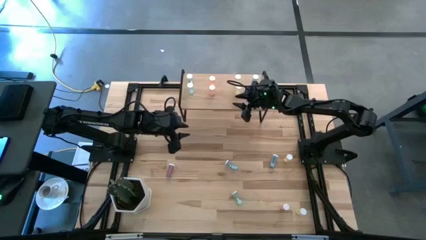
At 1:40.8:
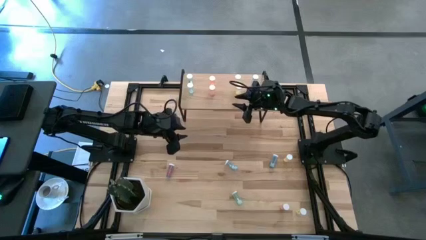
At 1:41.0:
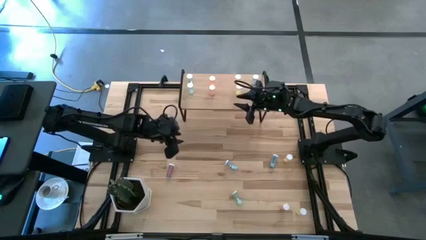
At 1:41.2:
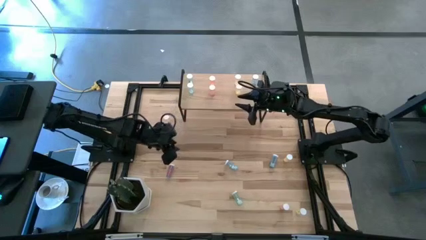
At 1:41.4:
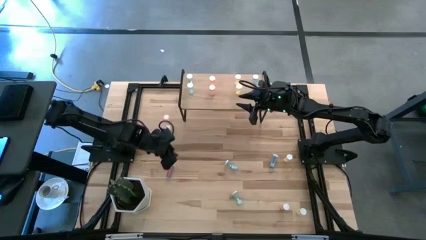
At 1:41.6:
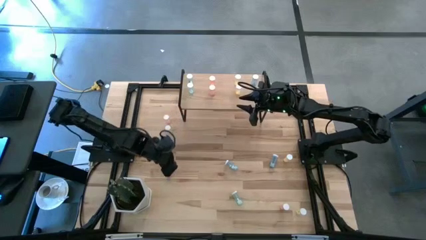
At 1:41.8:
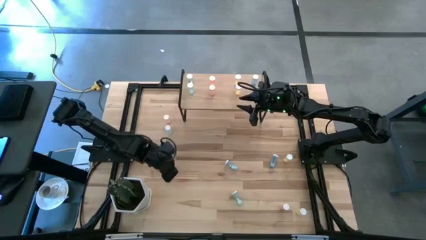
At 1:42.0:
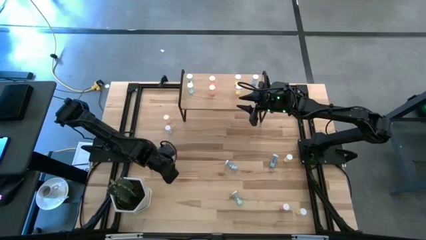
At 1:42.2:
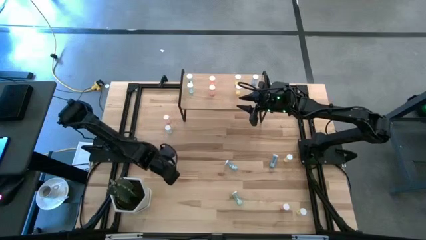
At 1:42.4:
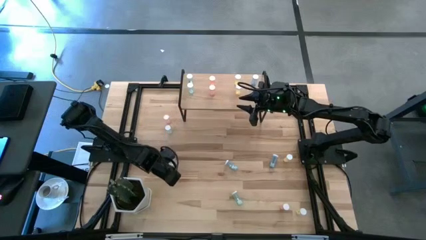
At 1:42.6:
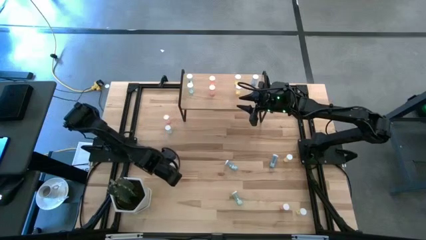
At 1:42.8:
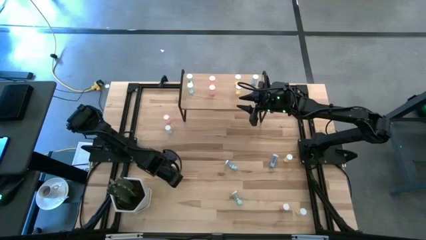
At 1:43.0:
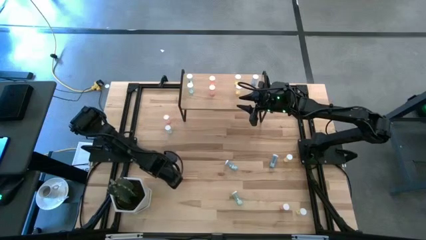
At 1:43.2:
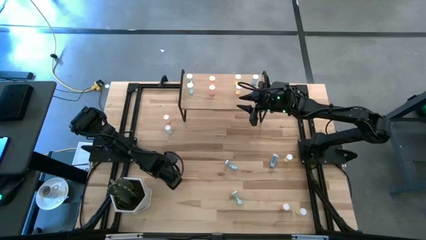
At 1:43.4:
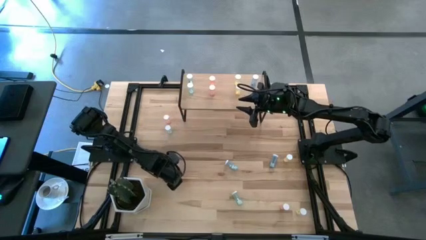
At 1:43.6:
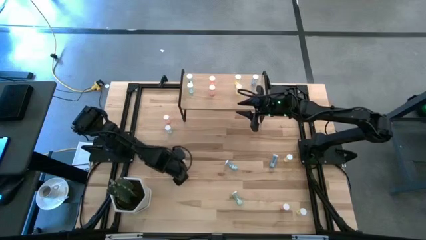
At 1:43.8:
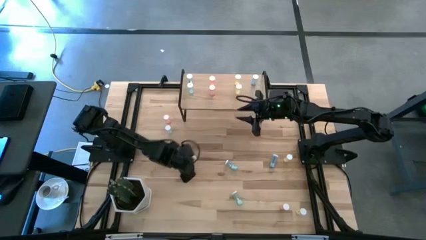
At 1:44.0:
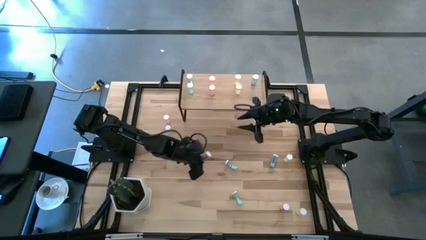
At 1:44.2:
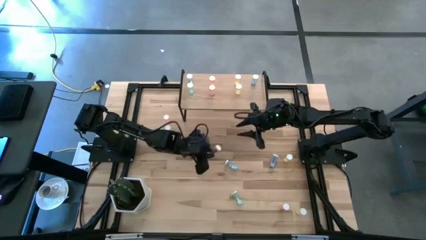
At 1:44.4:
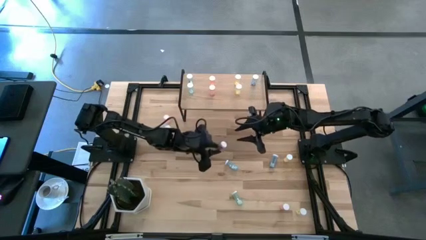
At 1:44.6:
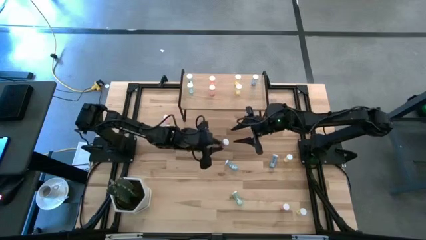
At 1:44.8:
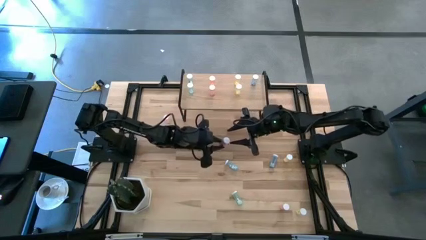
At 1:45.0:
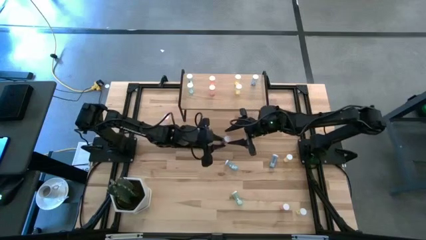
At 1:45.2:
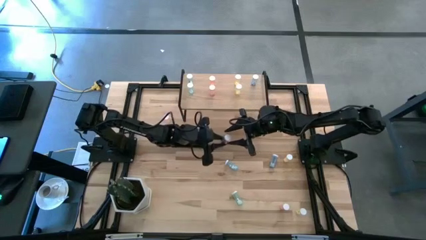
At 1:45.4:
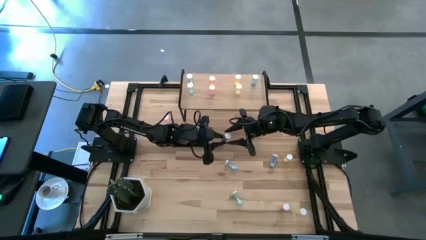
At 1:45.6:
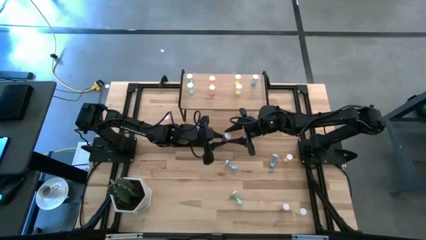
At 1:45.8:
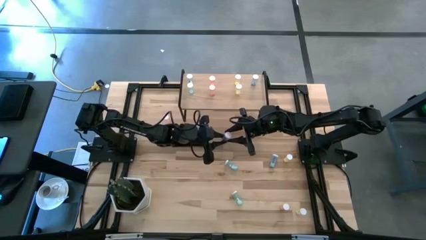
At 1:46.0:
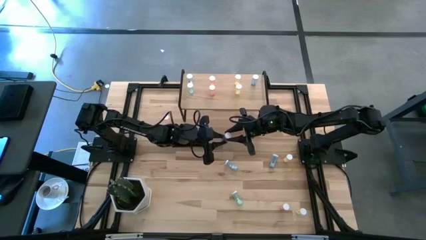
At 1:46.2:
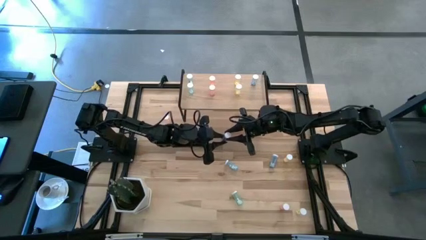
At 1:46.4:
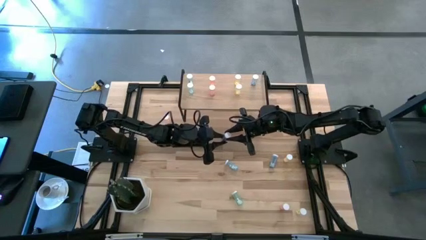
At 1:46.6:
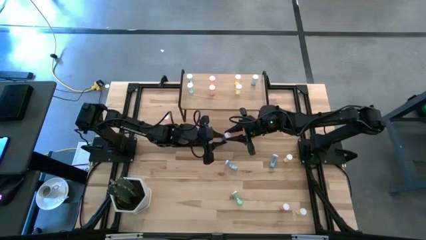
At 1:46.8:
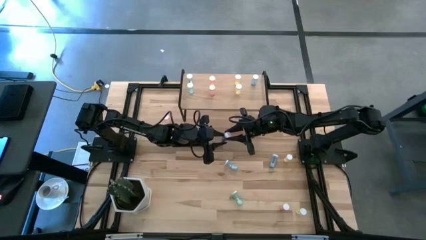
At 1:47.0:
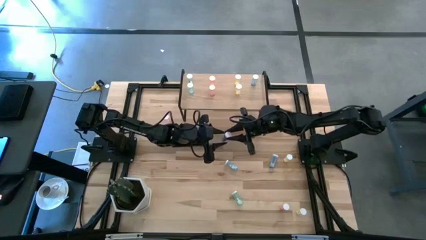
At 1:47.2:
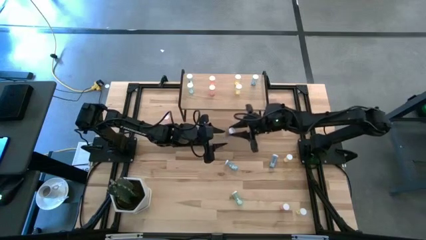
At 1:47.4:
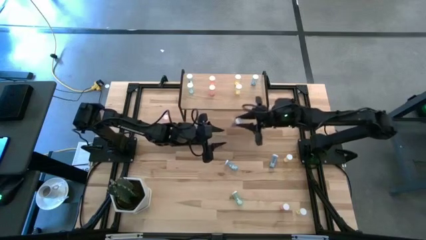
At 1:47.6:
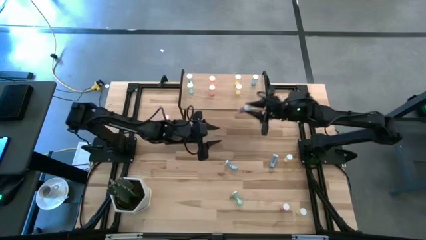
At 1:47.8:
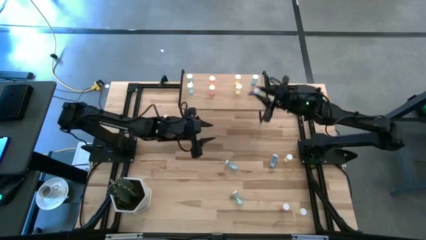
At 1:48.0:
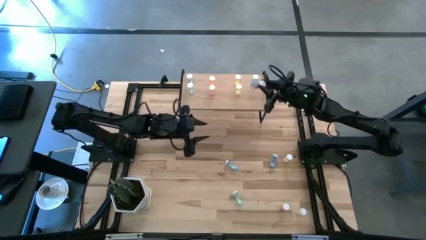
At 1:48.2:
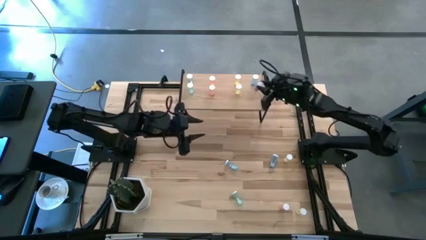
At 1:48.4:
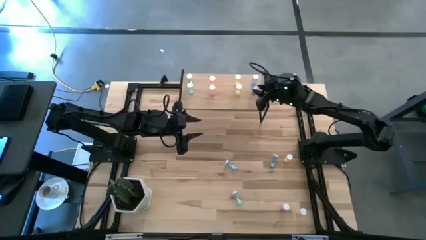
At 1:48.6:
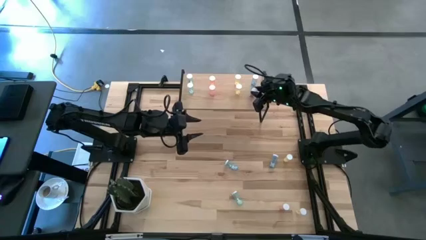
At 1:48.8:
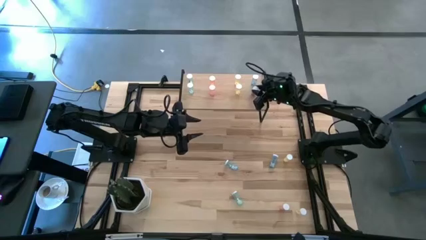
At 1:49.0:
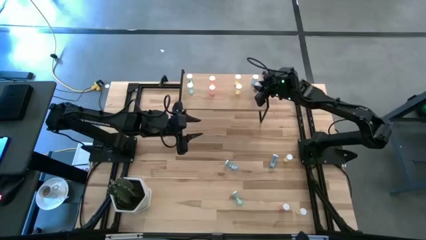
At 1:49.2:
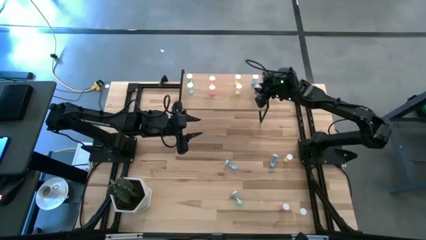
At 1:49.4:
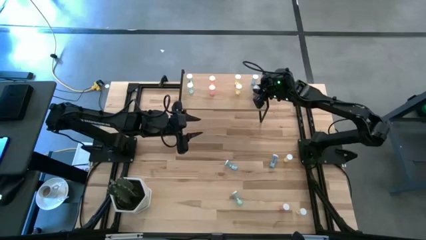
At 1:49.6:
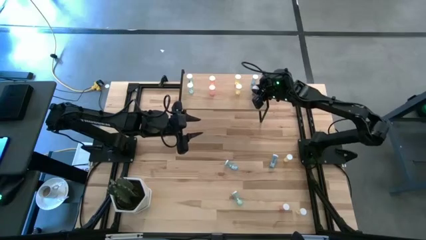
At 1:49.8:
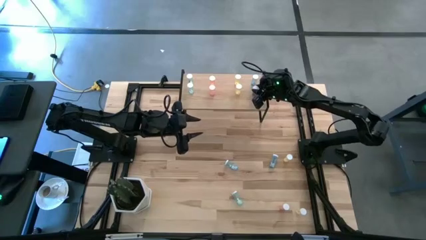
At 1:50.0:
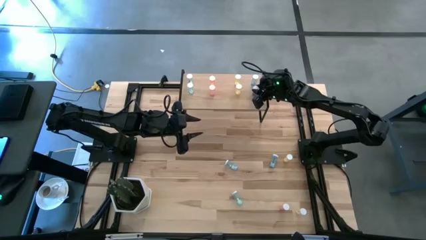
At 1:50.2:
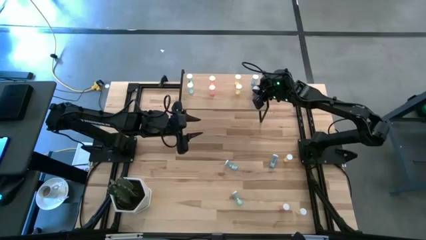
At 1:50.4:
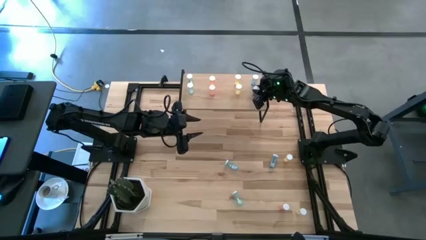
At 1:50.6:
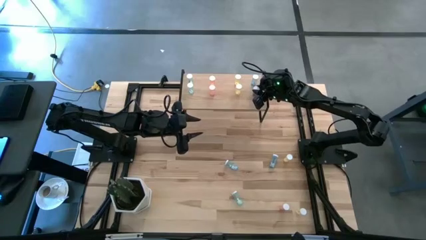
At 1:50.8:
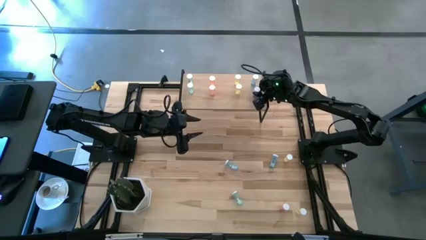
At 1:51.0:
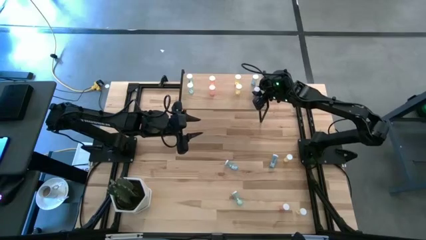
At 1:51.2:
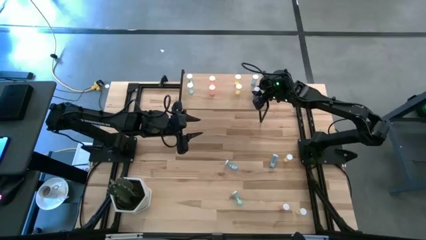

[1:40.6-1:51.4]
Task: Pick and place medicine bottles onto shelf by color
Align the blue pill bottle with the blue bottle on the shelf
